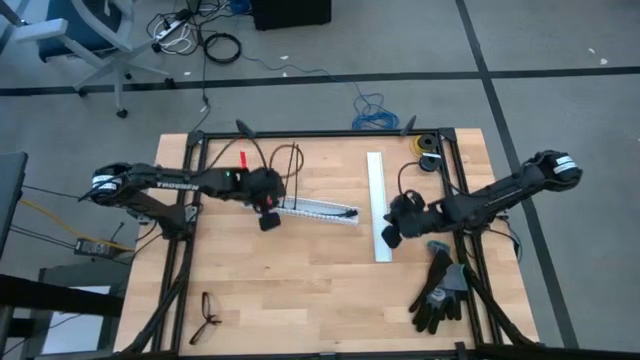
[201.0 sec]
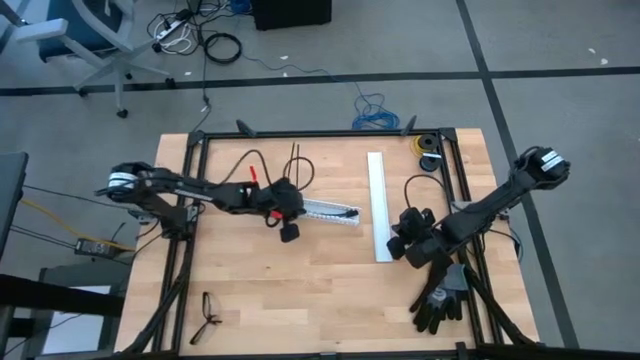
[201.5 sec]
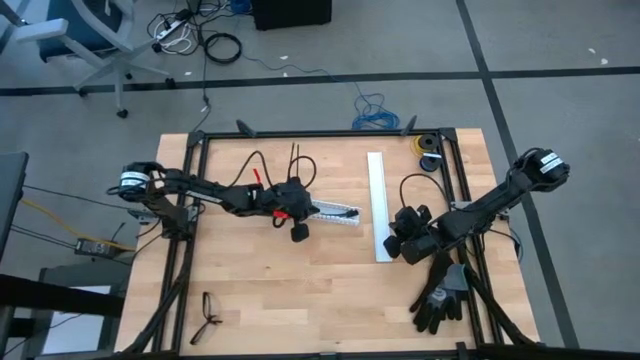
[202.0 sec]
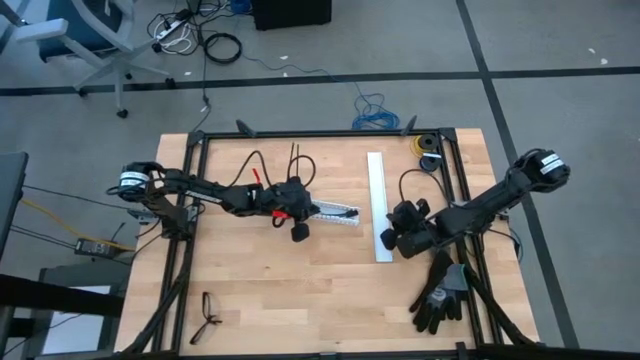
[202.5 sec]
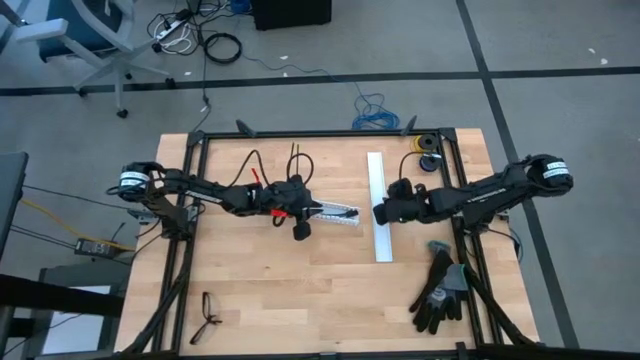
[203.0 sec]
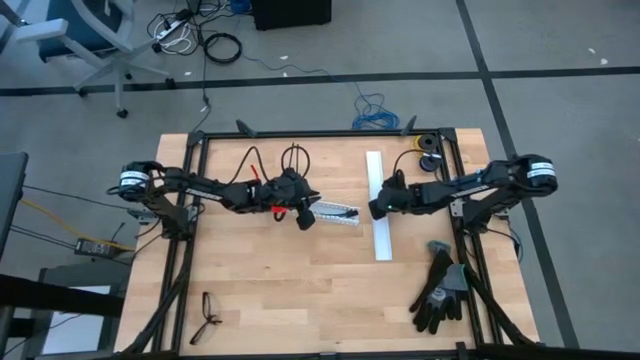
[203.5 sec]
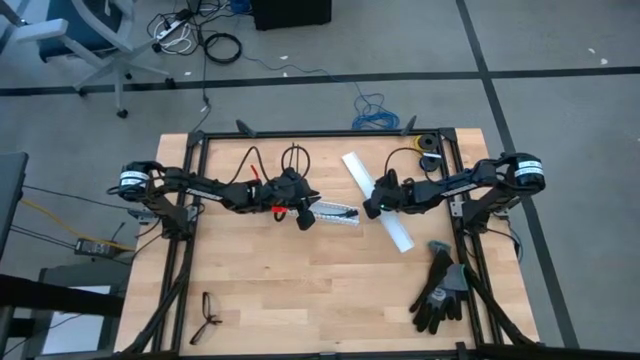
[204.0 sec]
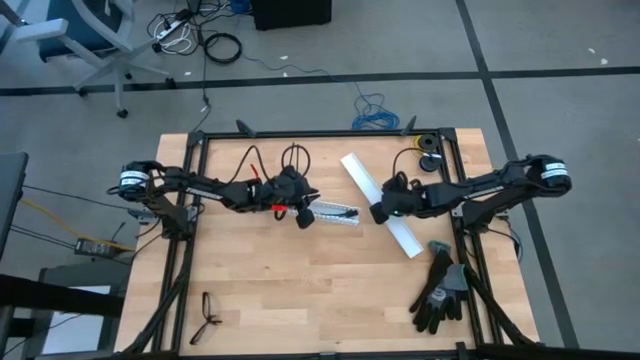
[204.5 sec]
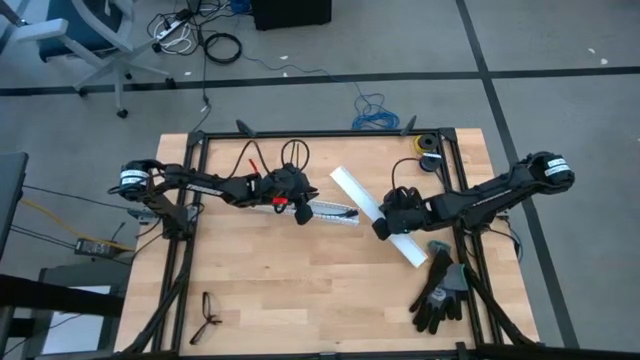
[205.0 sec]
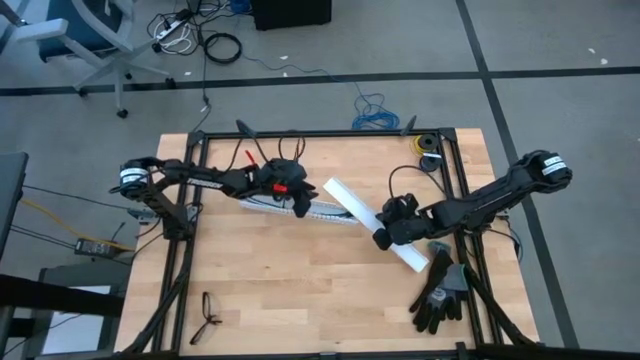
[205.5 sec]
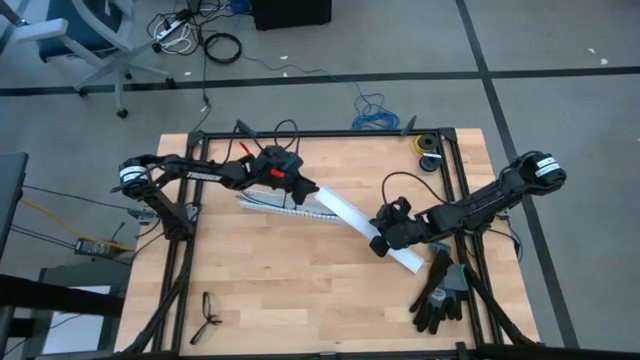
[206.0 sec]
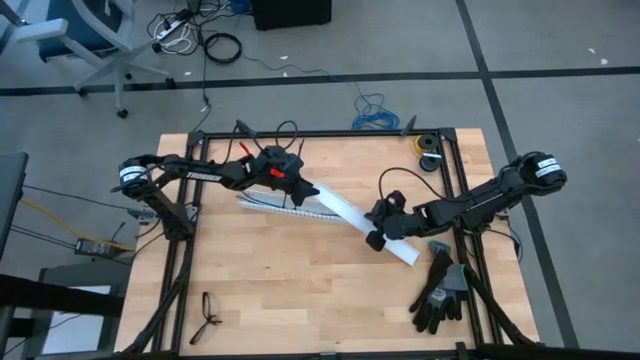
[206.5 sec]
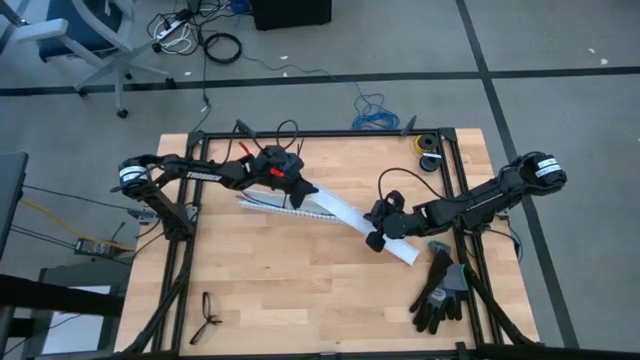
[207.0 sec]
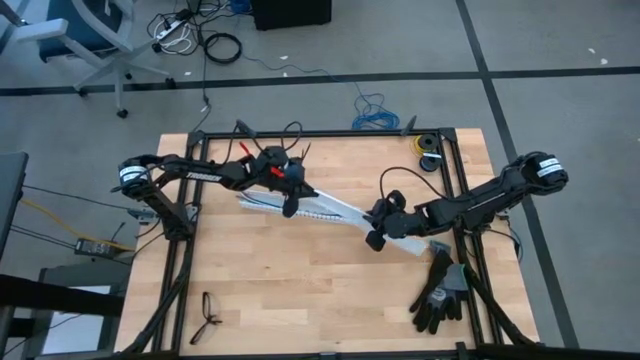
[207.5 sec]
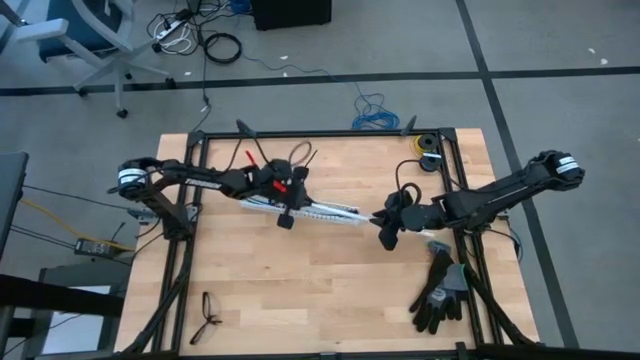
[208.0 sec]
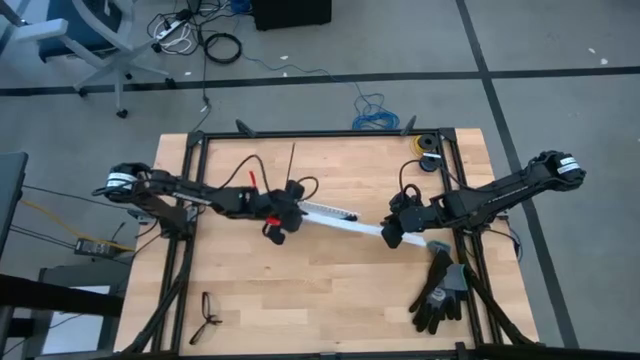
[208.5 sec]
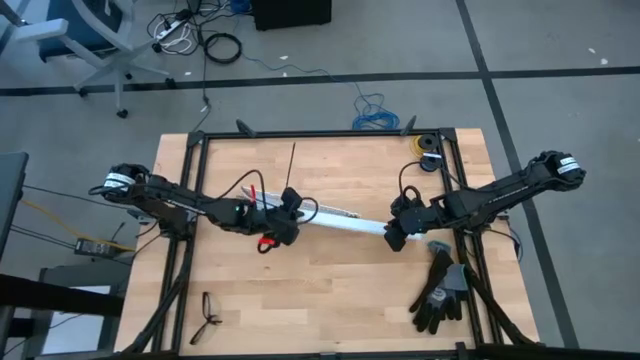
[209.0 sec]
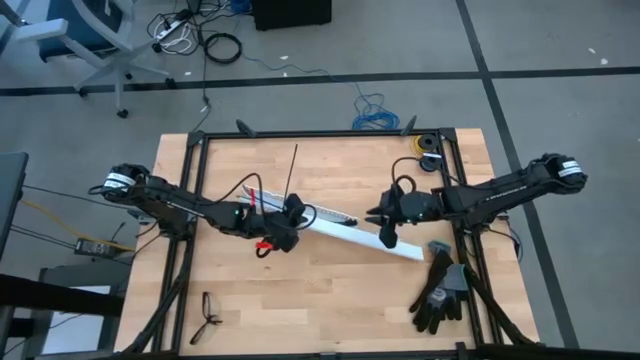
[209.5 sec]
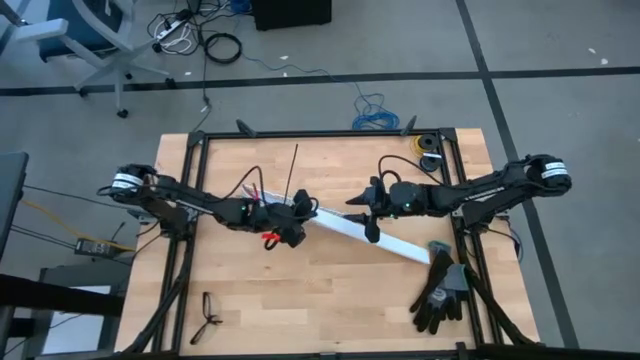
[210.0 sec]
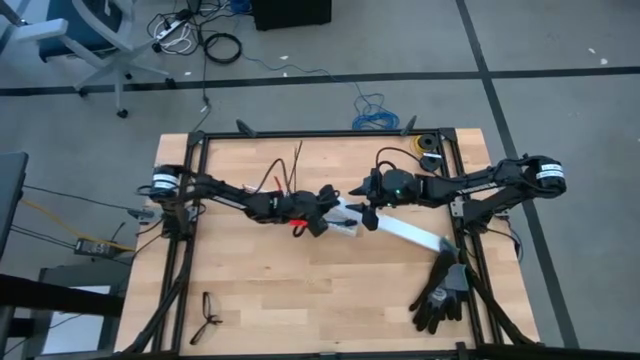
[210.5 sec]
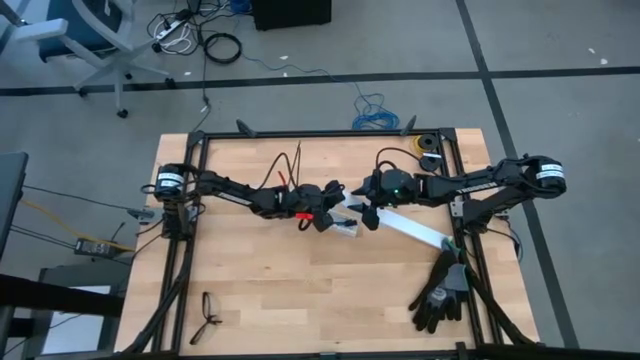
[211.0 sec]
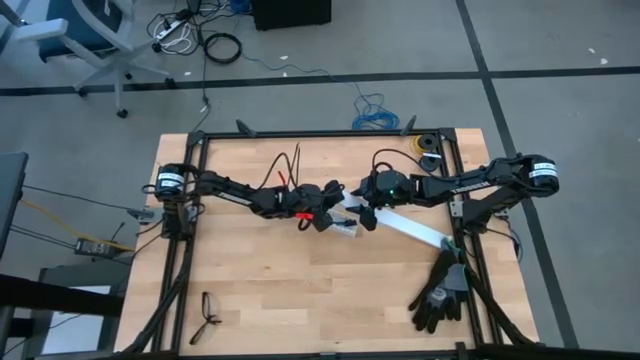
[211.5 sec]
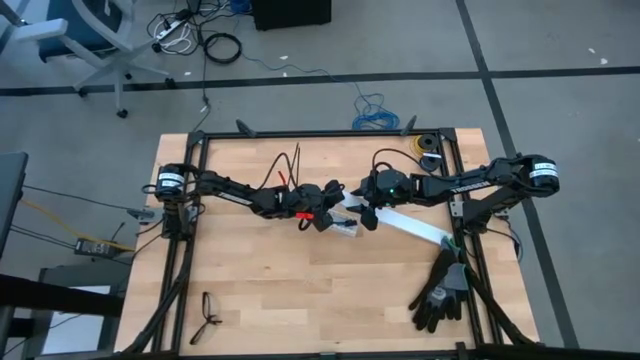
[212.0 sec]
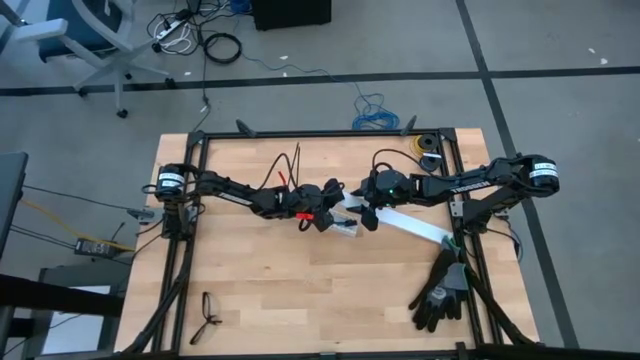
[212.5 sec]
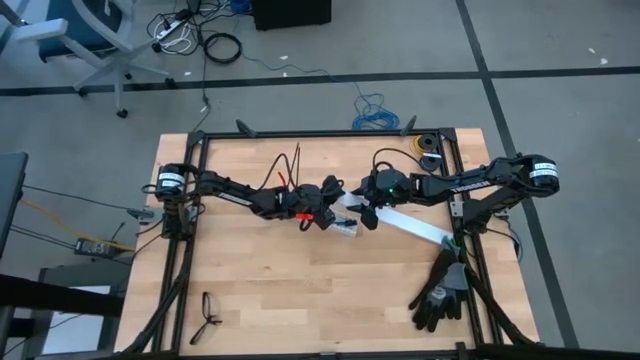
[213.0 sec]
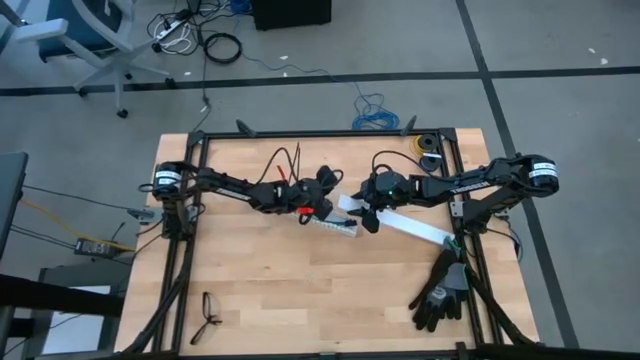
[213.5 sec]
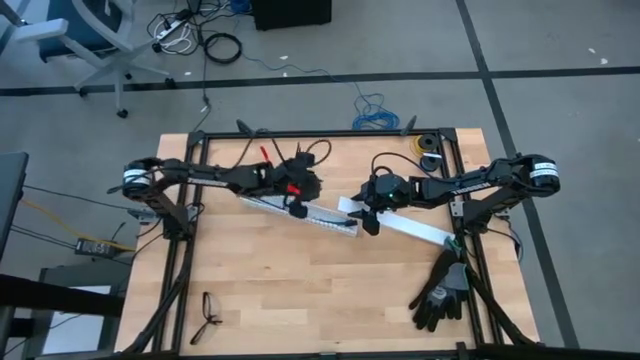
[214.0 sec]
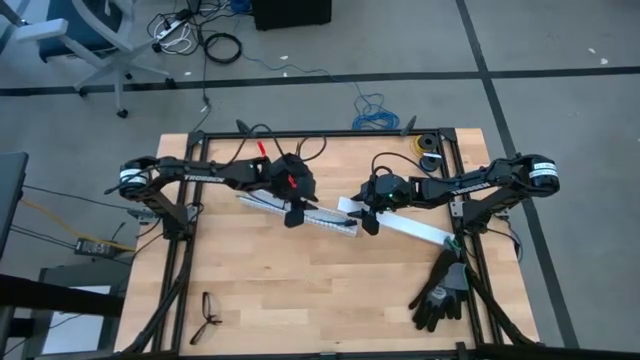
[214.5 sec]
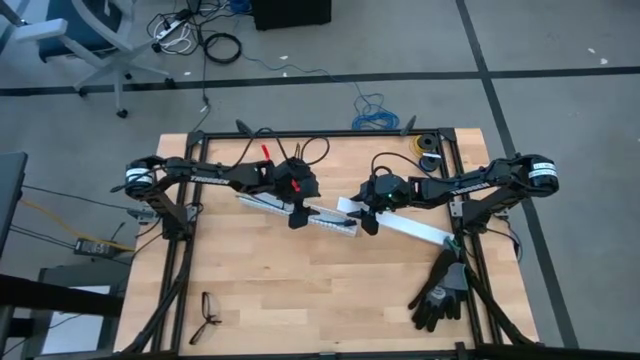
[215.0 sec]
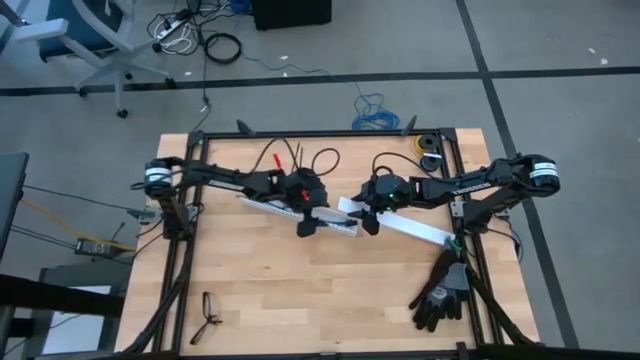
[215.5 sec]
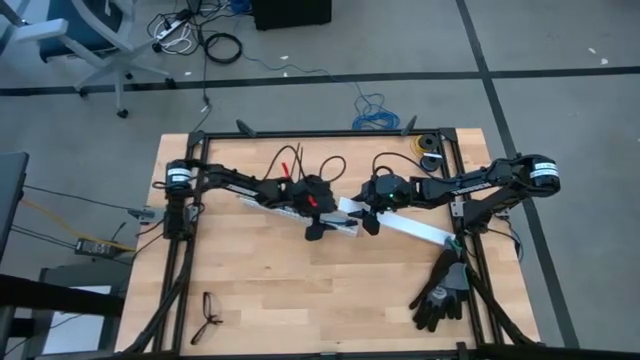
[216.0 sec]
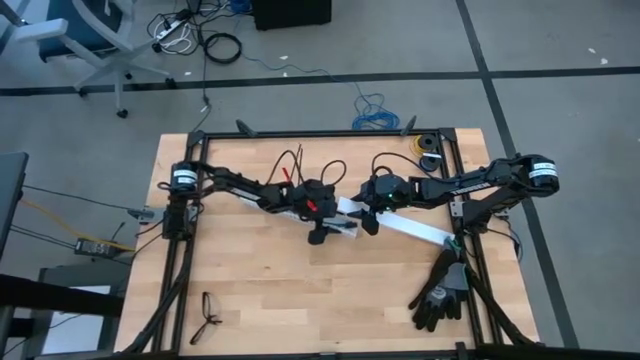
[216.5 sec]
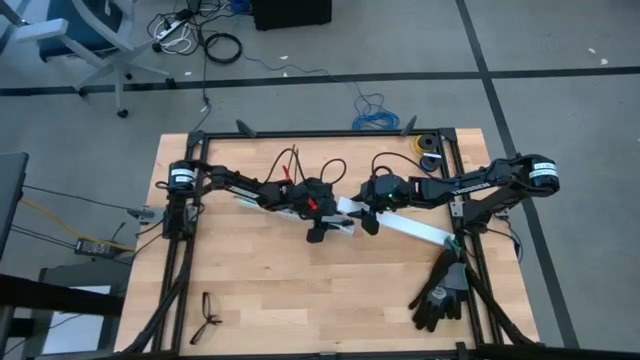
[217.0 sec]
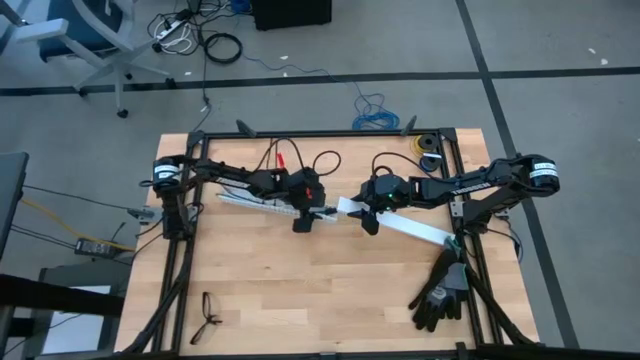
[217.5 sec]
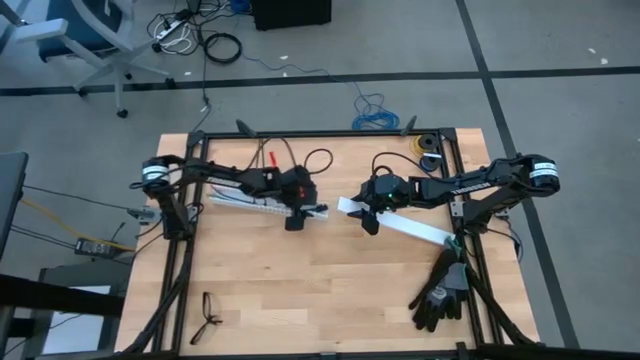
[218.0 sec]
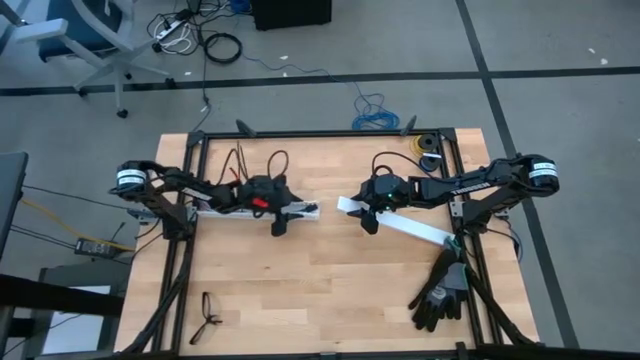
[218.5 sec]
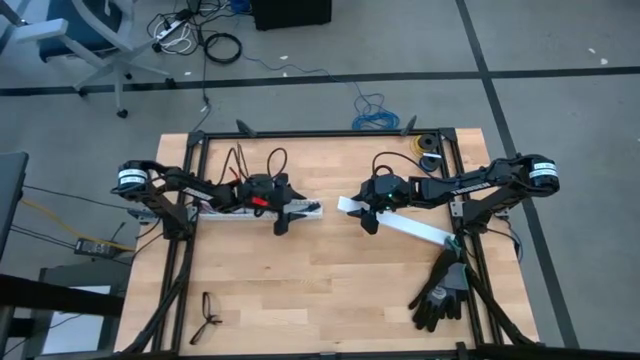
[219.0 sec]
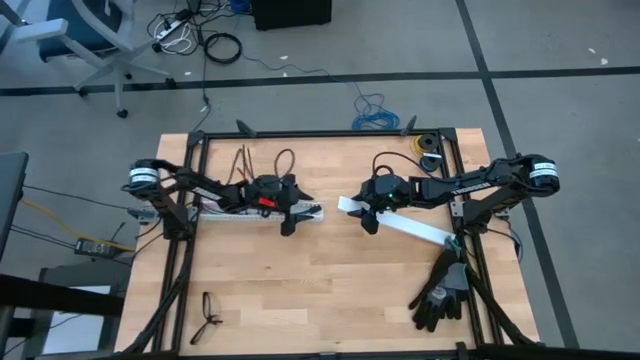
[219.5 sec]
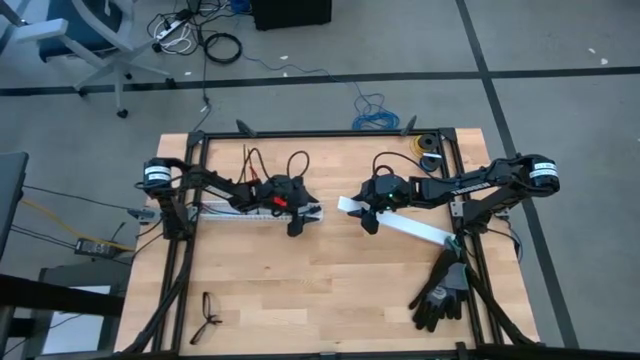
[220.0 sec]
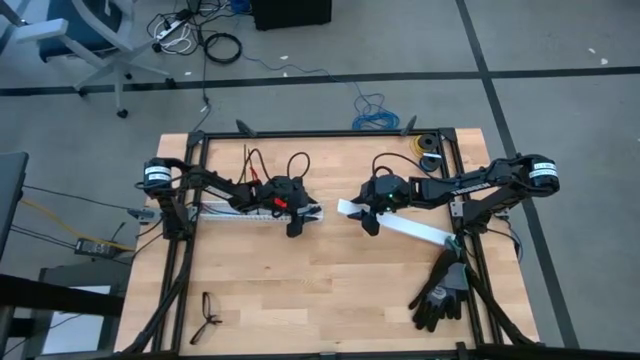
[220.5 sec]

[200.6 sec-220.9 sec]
Task: Ziptie cables
Close the white cable duct with the white cable duct cover
